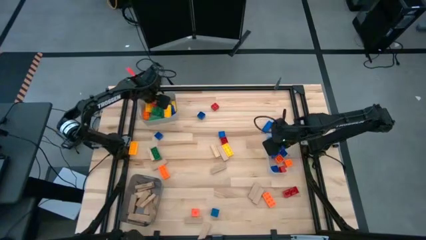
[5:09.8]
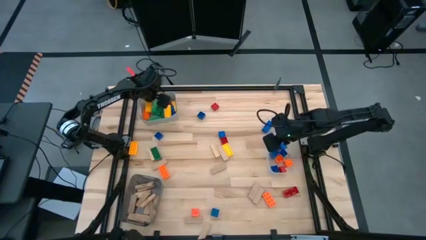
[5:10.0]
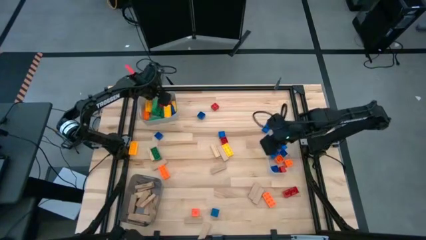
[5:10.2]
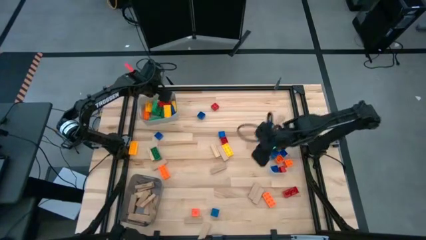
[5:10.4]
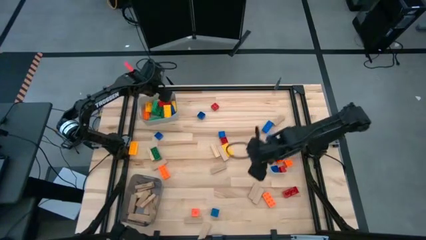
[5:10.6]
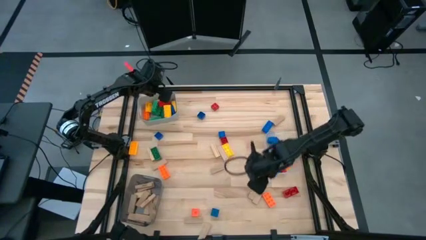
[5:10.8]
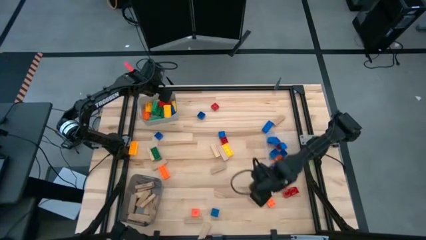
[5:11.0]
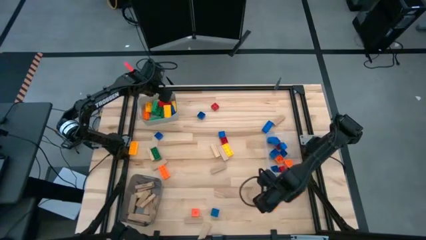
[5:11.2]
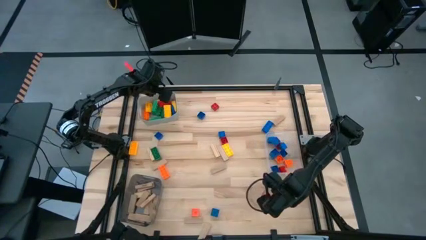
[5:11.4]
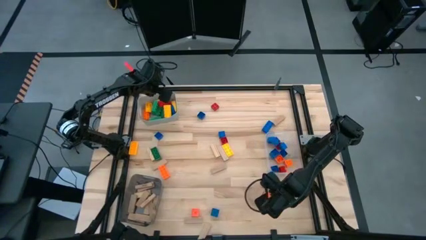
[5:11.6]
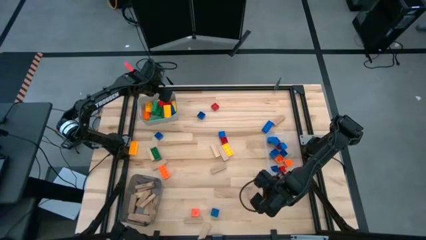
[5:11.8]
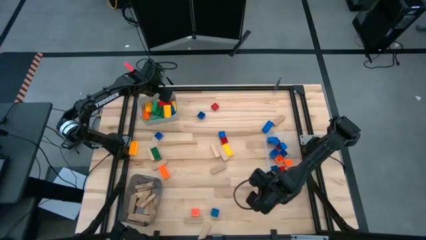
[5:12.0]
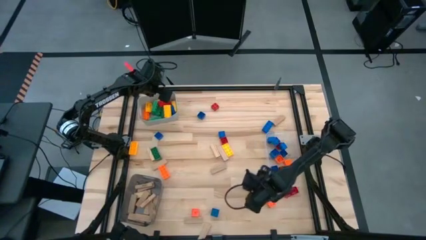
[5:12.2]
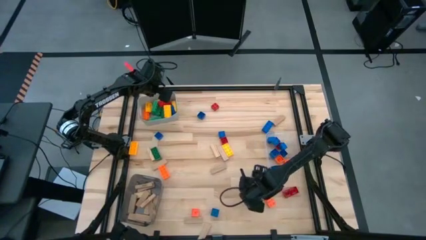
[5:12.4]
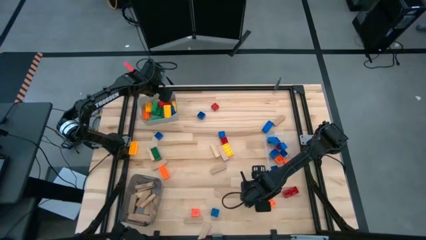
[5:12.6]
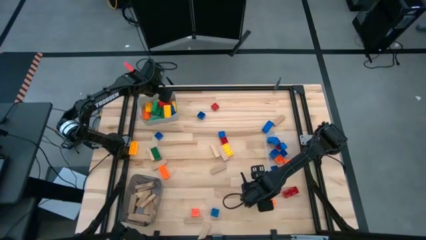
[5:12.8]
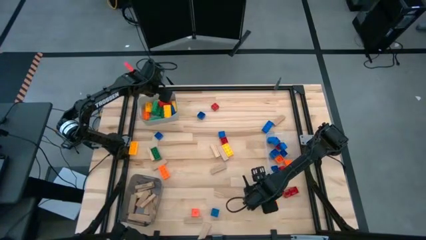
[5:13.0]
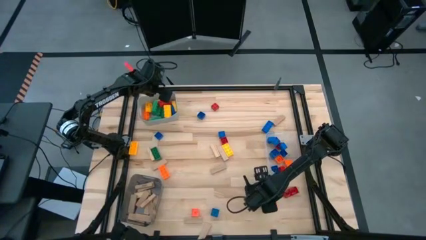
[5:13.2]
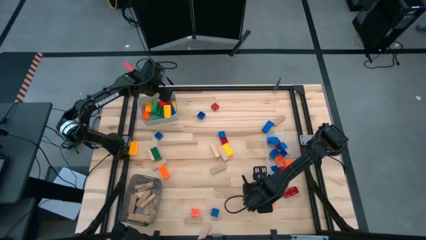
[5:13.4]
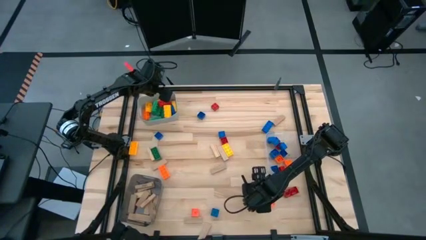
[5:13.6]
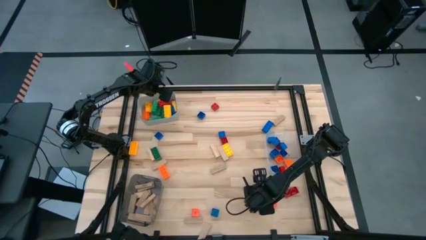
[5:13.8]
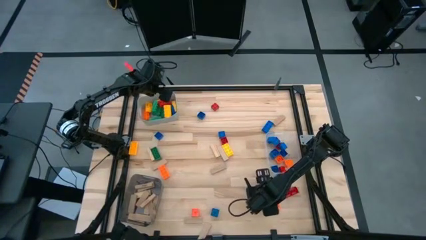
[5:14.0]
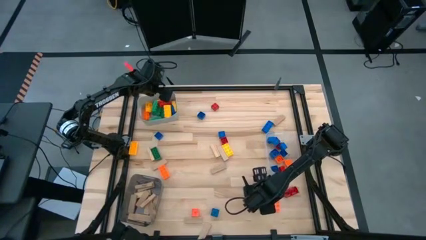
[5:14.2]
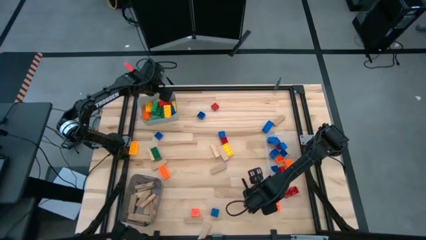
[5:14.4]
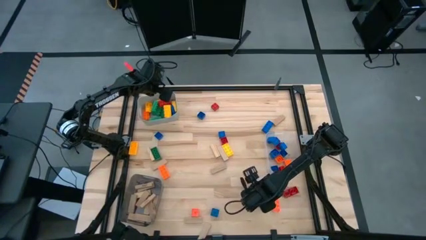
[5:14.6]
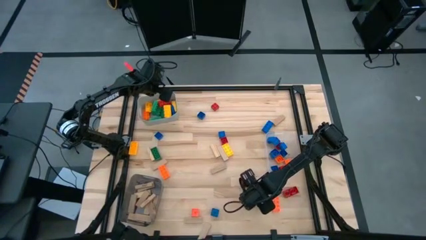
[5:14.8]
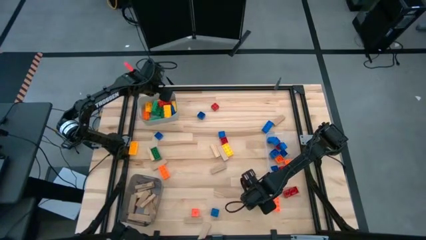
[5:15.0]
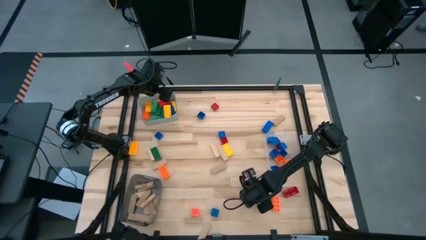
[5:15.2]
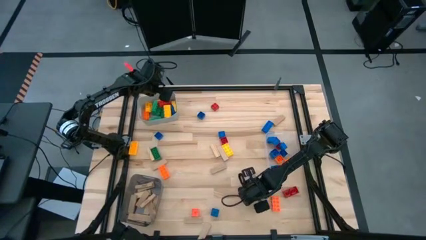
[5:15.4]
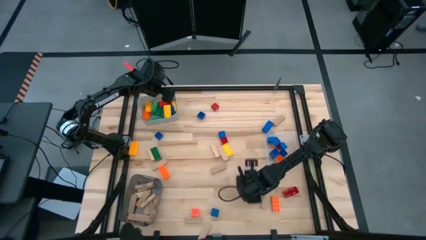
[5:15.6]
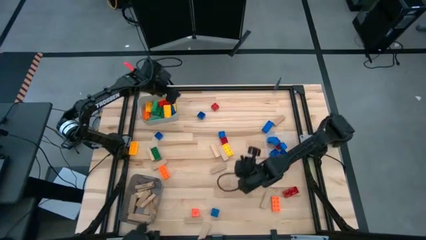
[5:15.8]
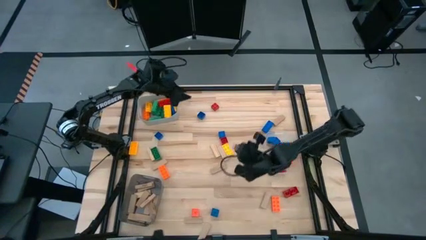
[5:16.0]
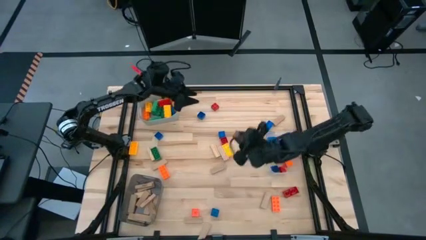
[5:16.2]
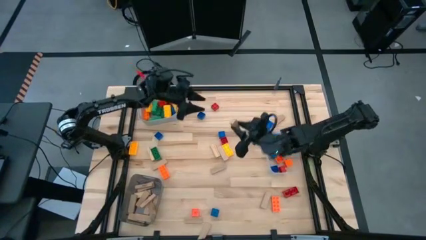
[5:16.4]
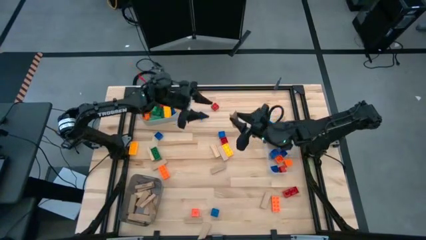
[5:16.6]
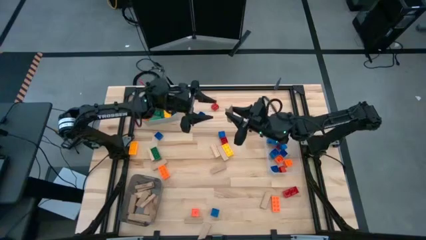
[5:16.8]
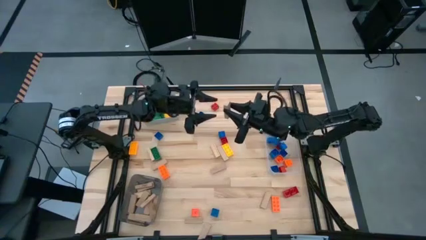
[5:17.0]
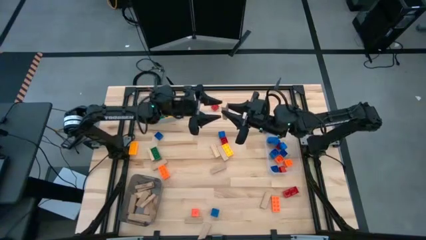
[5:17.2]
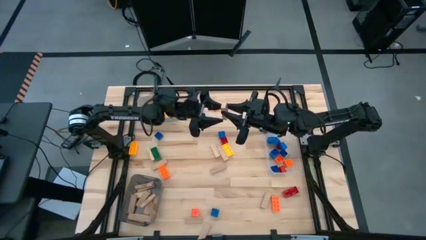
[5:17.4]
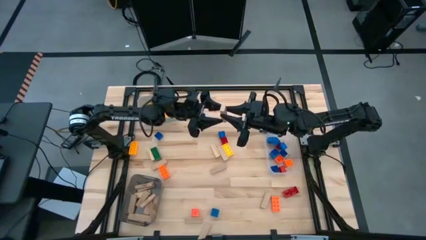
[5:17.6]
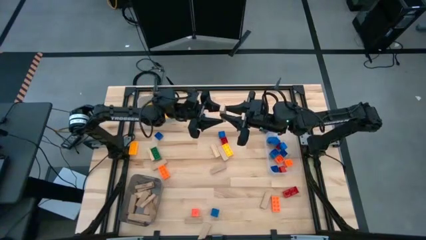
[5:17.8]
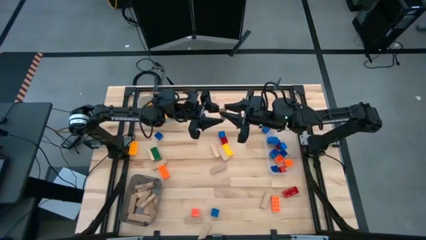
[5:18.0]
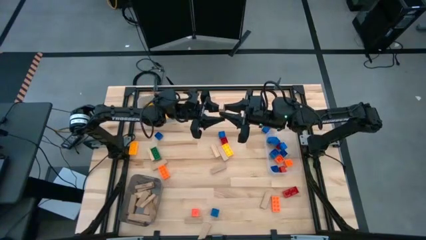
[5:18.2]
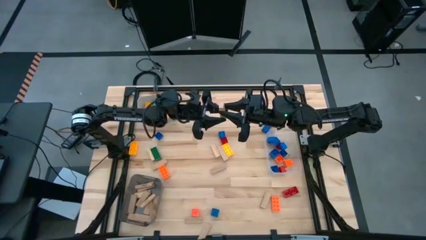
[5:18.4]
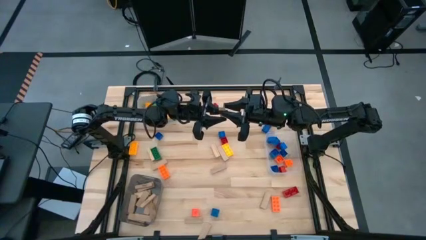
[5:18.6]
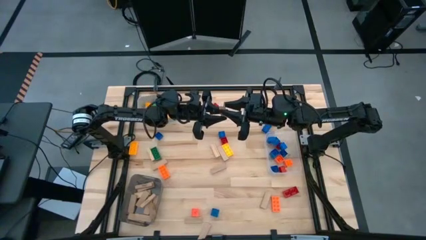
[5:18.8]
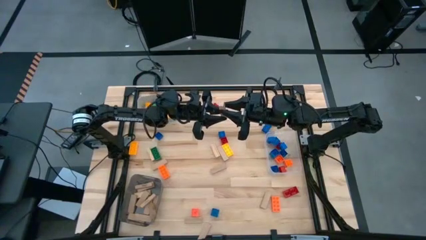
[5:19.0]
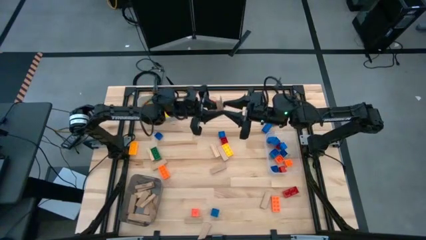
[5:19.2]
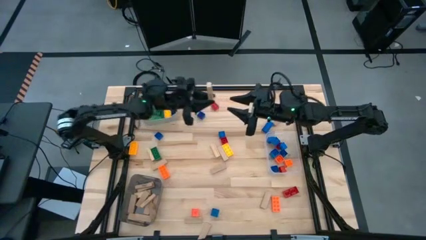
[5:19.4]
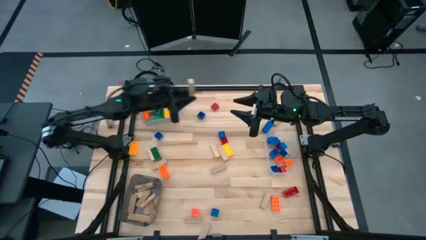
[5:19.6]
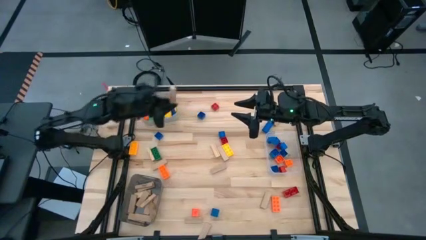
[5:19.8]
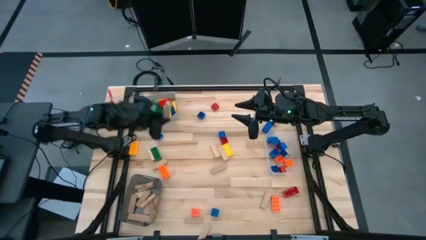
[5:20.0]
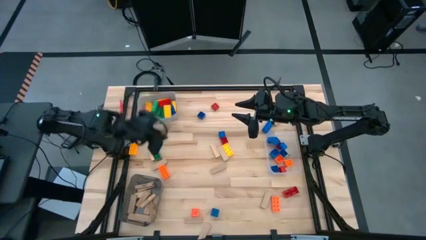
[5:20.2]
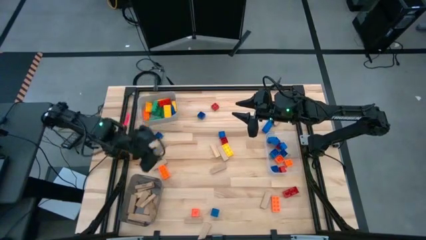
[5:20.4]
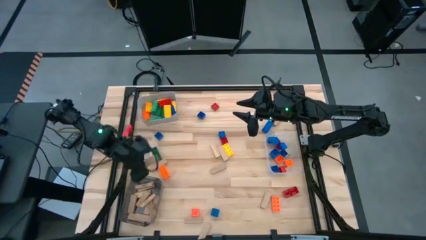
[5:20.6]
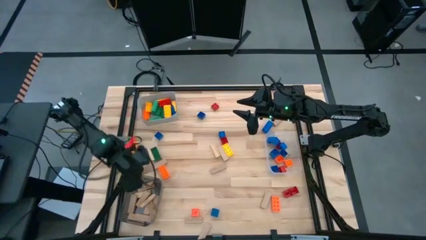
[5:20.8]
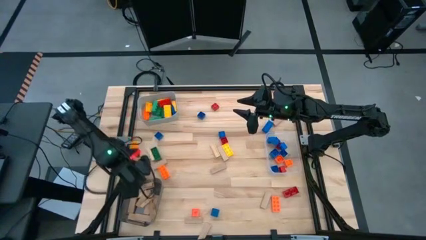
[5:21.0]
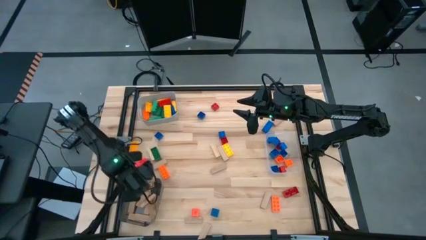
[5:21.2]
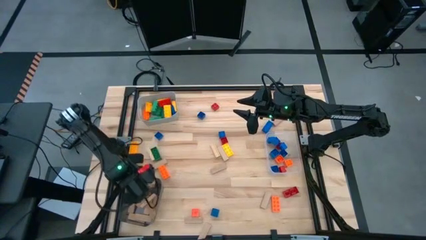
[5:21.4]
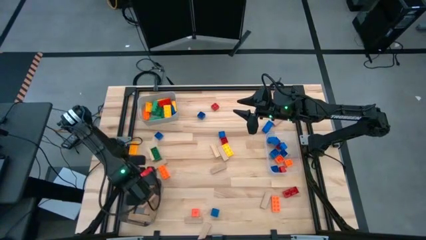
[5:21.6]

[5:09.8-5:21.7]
Task: Sort blocks by size
Put the brown block into the black bin

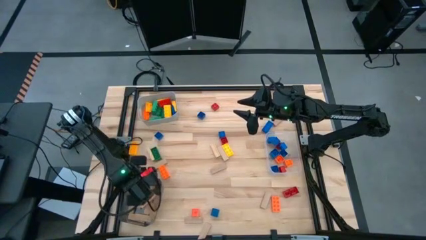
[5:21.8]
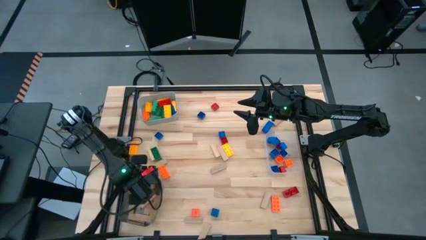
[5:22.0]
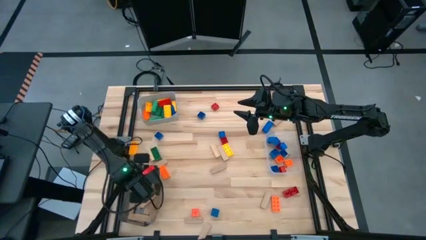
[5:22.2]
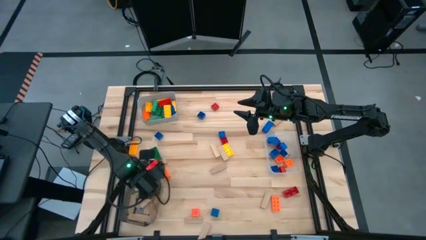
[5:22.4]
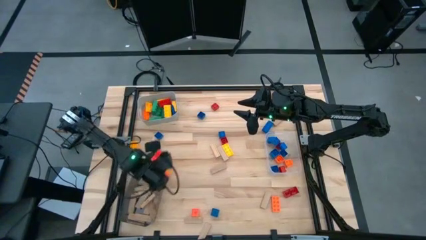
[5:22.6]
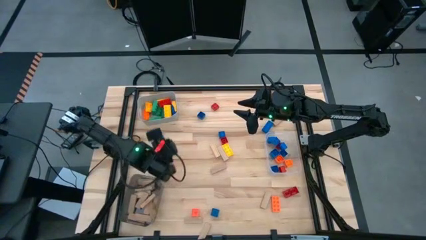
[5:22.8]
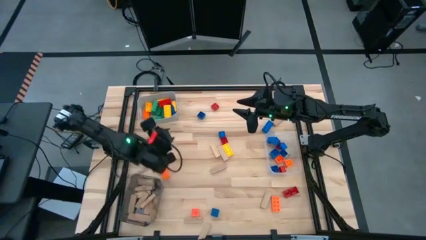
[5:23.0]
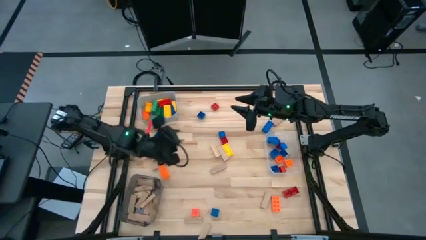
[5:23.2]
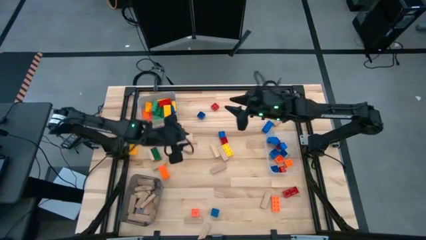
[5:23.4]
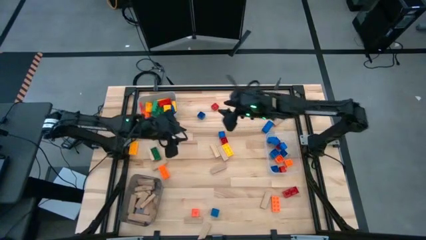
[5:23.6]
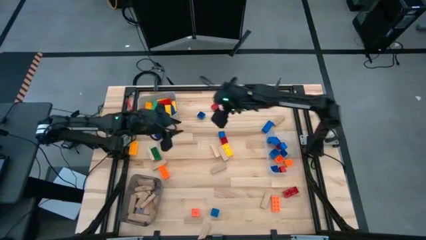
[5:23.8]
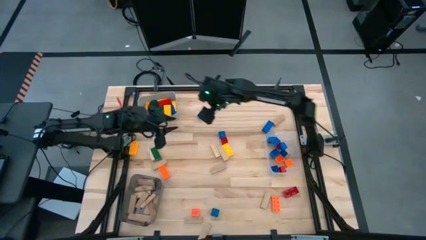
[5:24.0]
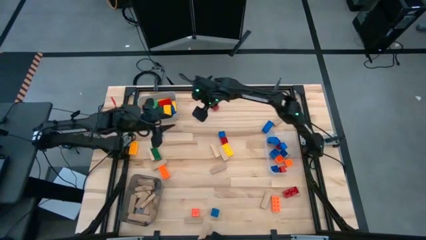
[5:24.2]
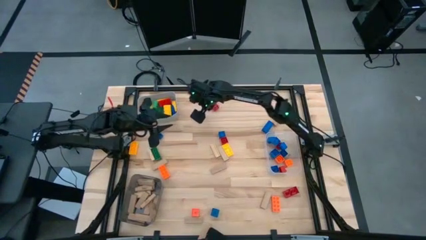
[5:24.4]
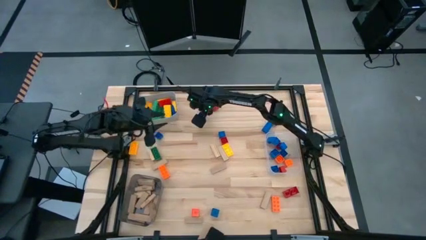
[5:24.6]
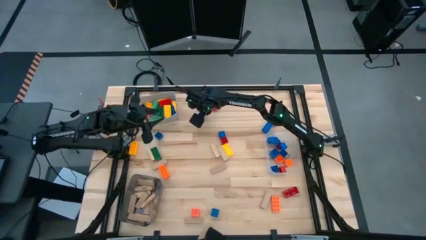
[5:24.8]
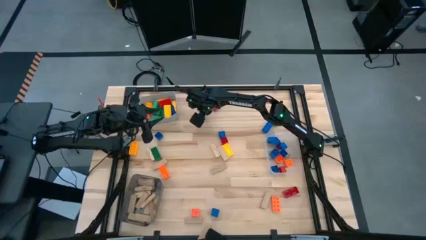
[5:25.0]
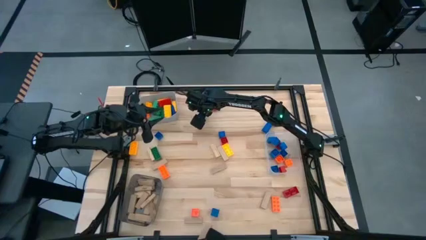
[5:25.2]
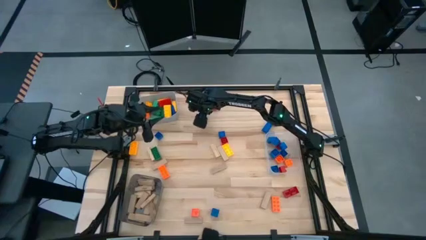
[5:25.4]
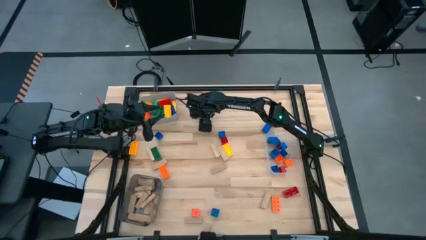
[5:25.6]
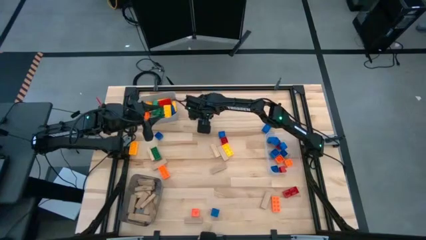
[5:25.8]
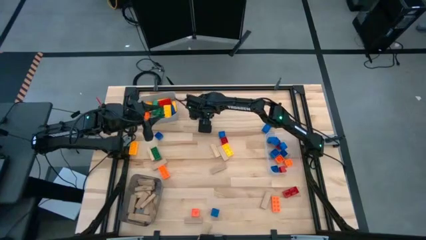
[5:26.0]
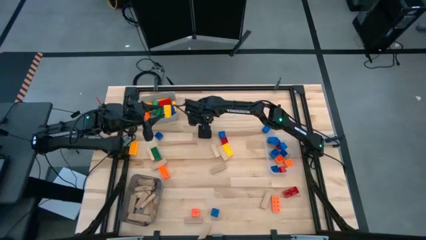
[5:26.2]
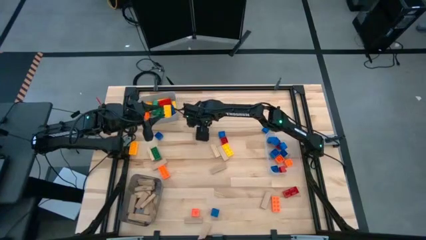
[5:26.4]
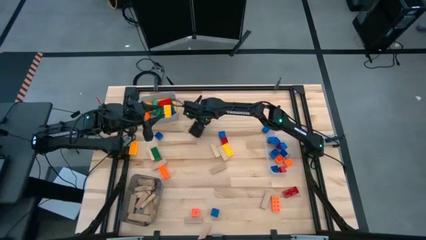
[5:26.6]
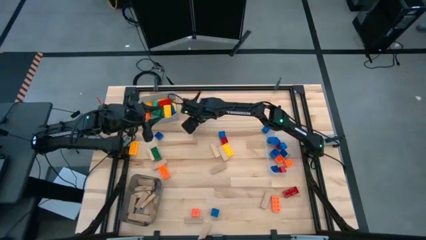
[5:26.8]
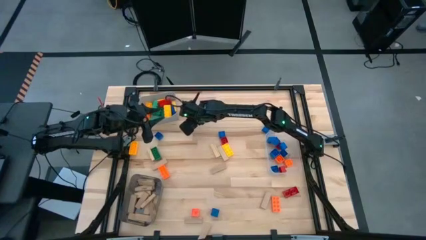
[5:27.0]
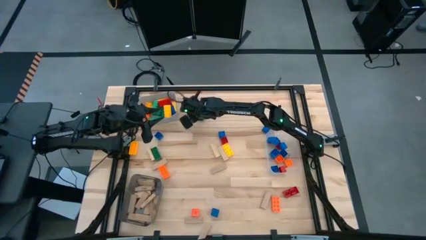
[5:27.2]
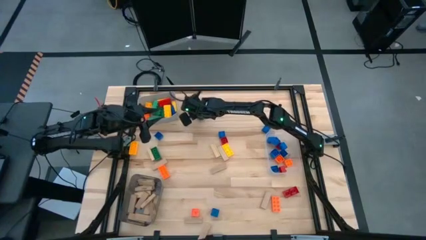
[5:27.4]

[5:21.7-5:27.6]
Put the top center blue game piece into the transparent bin
